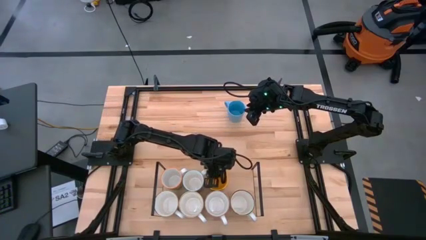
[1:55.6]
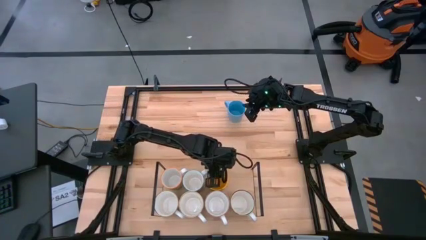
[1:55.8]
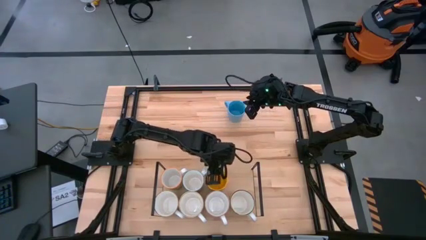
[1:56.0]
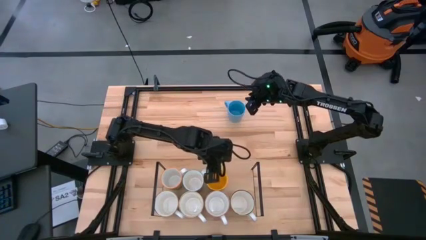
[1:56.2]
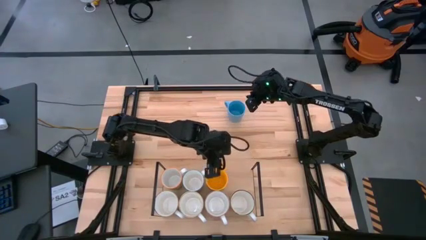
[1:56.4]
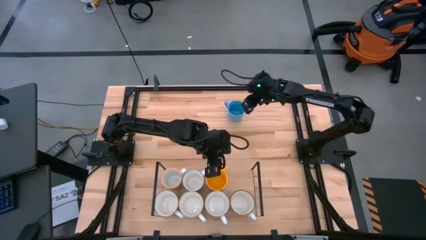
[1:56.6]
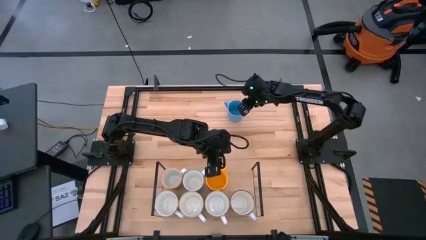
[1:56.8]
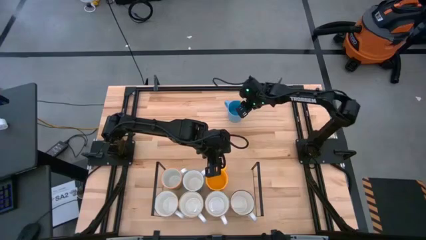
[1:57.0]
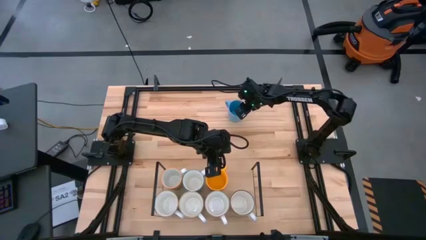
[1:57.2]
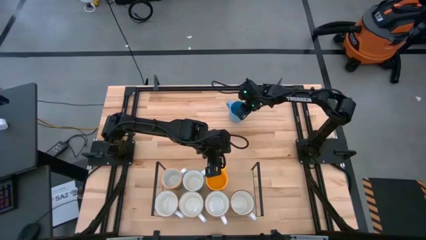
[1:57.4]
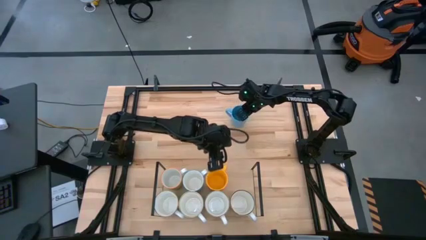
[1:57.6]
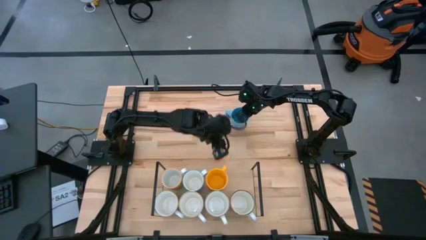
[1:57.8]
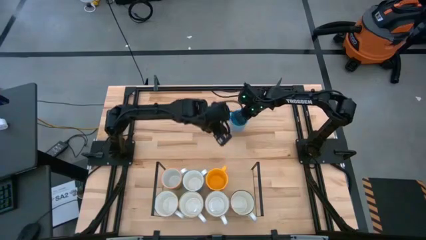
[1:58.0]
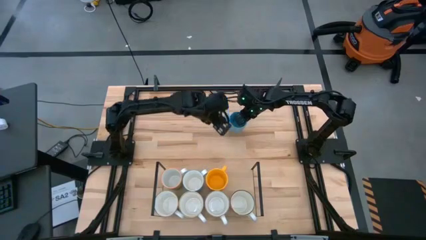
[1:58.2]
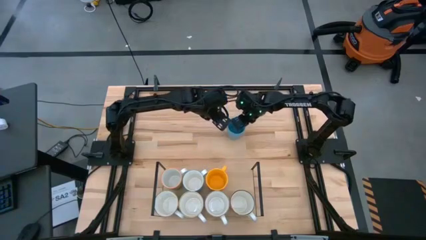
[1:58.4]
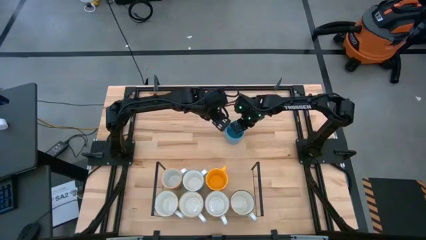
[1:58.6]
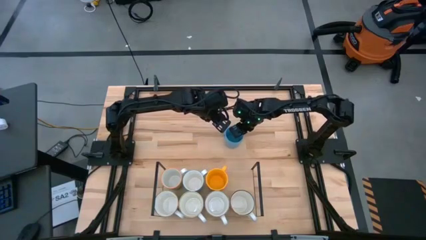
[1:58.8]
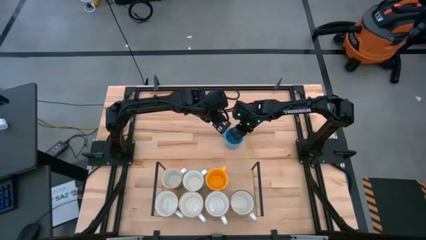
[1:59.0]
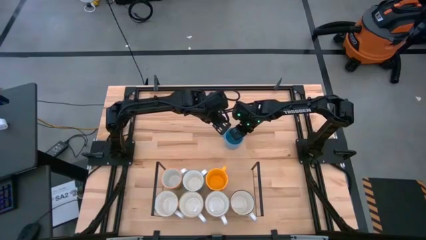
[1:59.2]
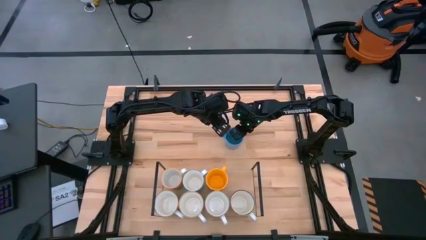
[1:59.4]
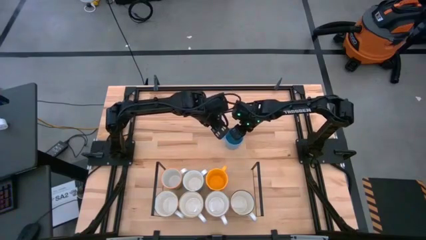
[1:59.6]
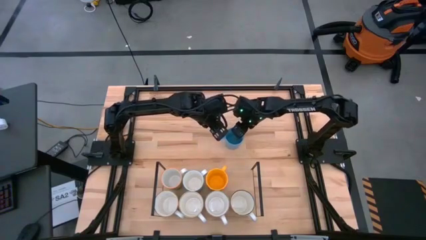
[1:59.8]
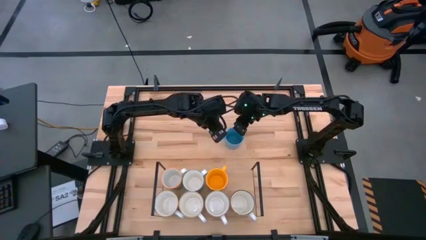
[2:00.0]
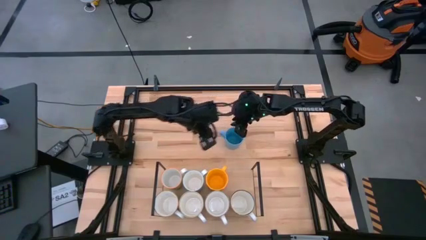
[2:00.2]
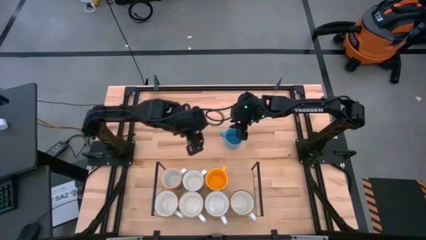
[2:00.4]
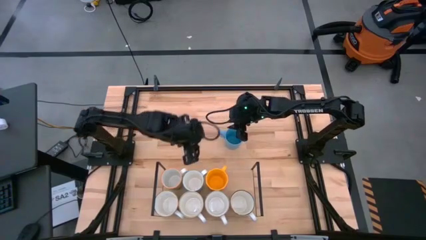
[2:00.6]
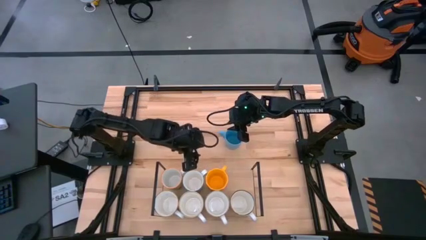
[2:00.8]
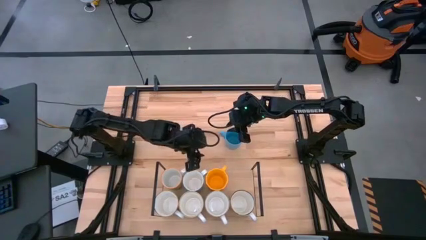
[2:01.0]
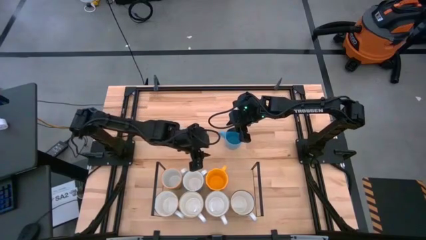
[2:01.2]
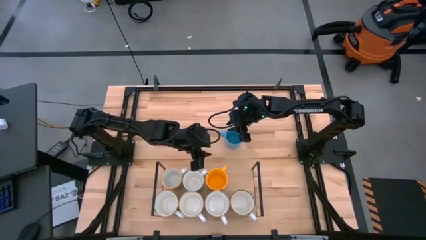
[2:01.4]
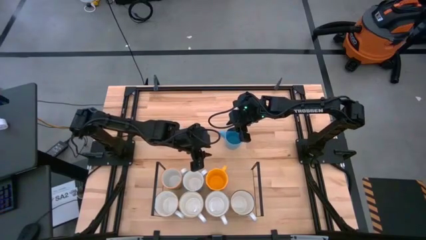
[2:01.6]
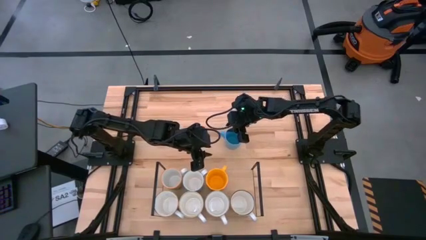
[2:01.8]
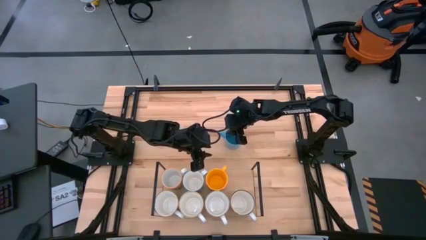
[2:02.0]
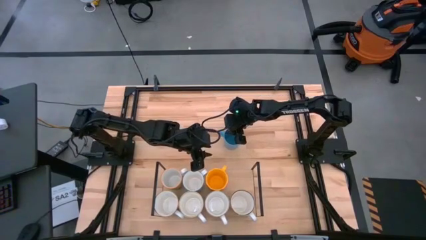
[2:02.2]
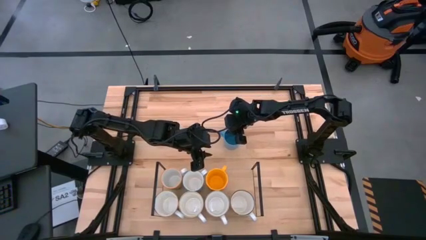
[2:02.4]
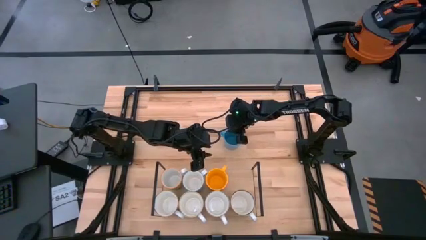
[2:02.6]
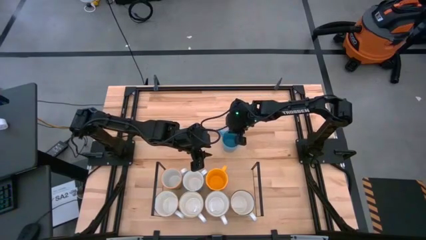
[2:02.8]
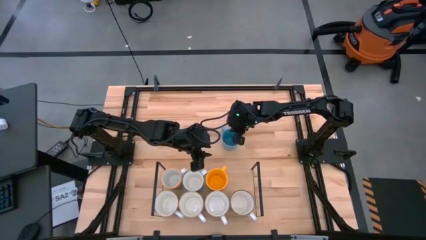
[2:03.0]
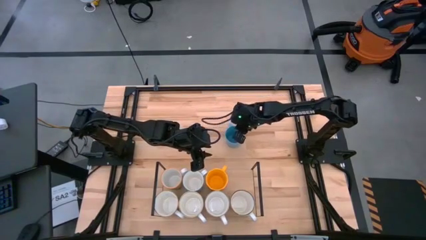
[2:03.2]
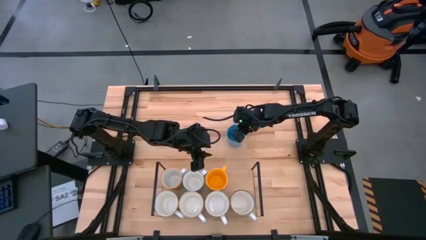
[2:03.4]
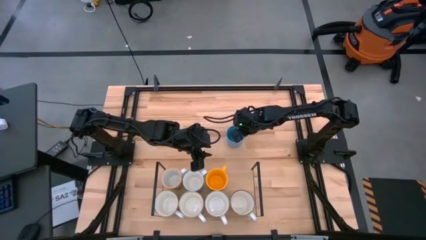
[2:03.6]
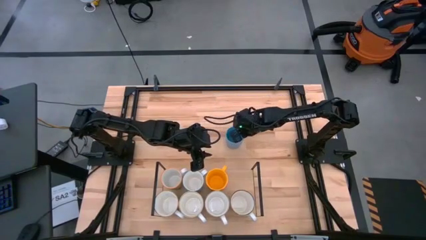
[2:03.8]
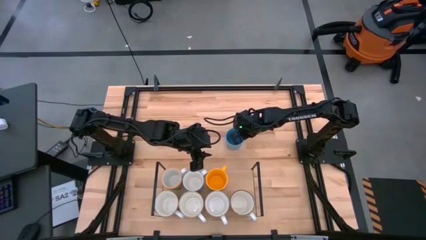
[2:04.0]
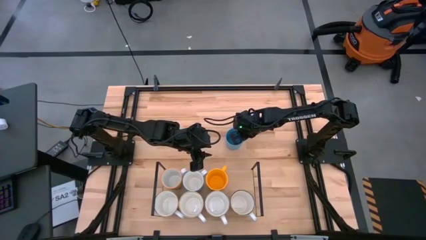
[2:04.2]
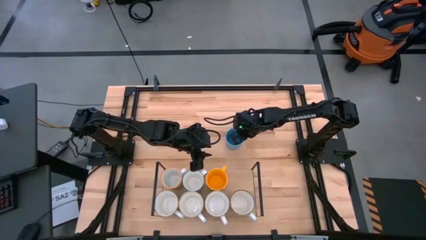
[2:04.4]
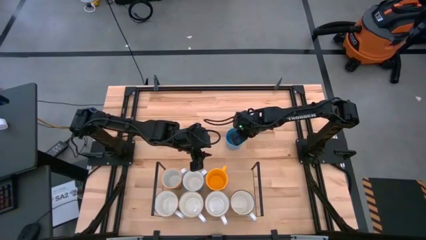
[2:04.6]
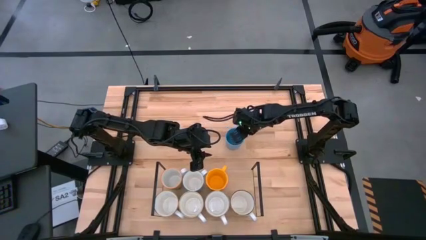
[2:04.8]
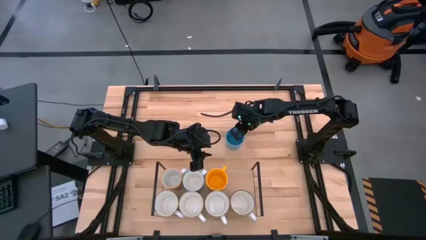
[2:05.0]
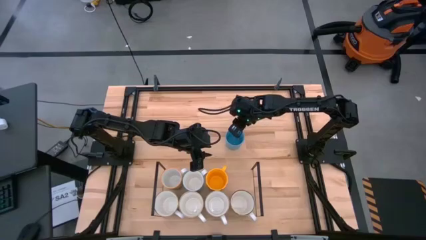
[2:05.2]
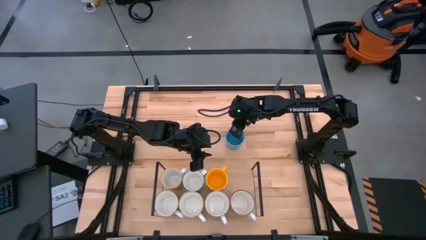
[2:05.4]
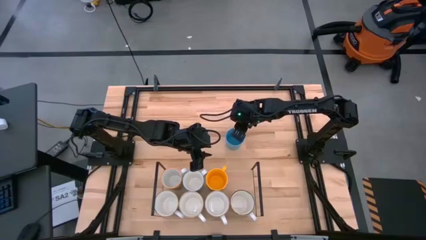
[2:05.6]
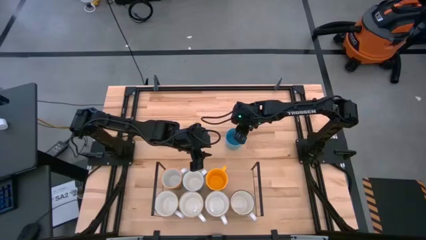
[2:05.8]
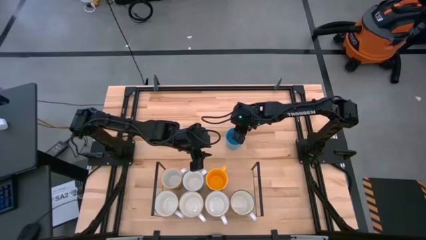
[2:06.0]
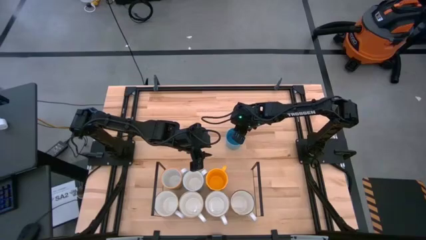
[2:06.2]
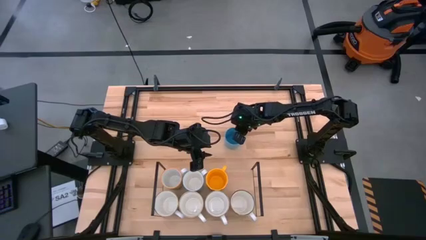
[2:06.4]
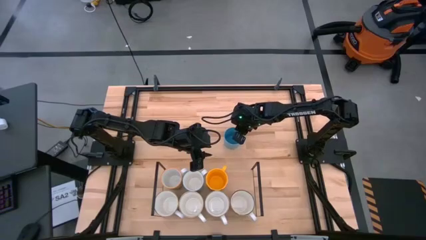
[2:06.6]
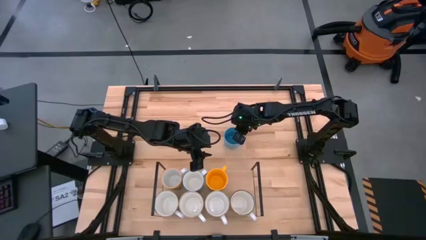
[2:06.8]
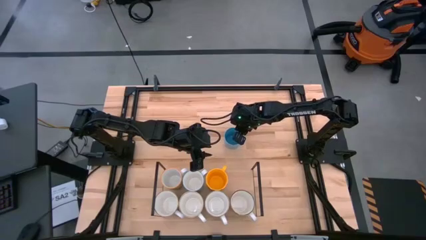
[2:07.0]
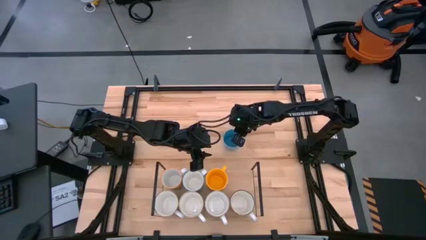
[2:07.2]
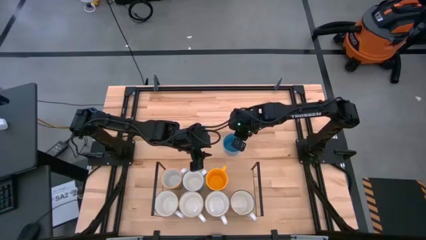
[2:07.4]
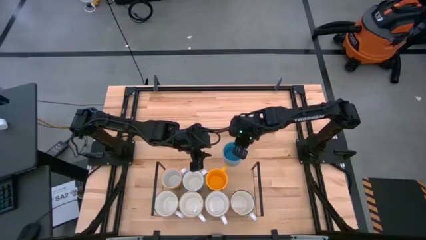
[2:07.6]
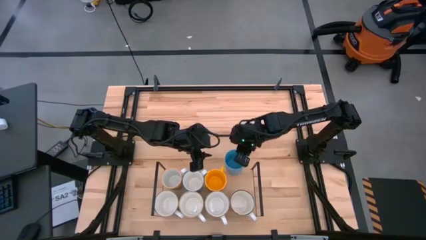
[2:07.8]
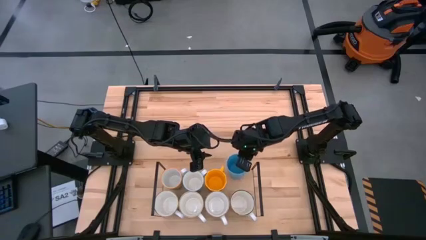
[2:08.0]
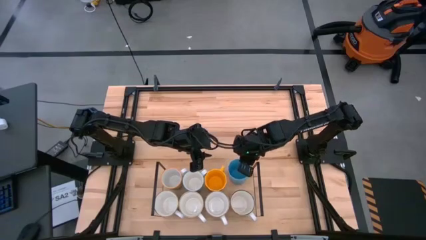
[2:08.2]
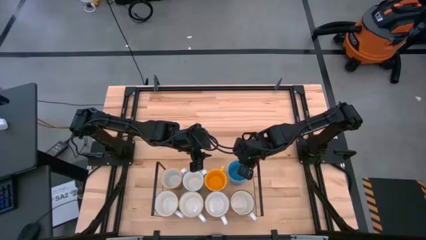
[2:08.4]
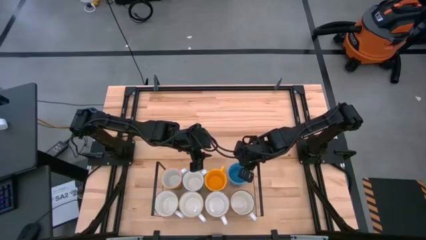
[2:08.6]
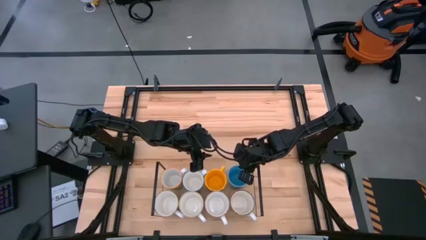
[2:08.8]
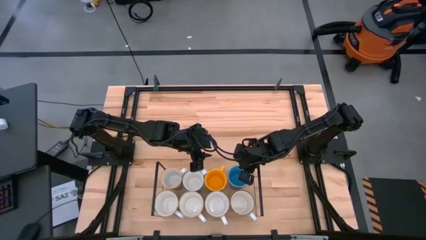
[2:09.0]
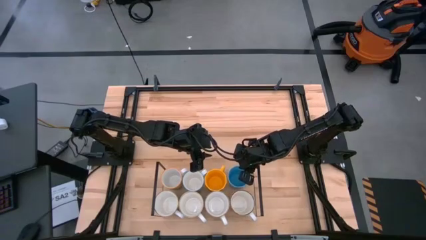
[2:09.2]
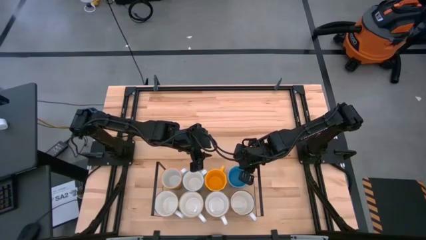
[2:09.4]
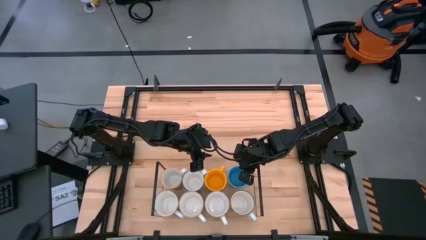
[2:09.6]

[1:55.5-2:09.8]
Task: Place coffee mugs
Put the blue mug on the shelf
